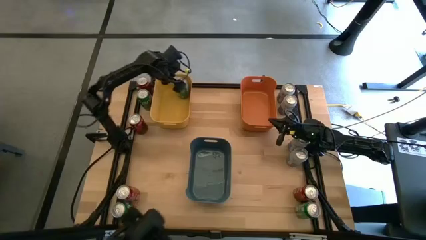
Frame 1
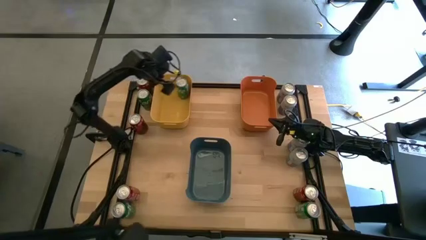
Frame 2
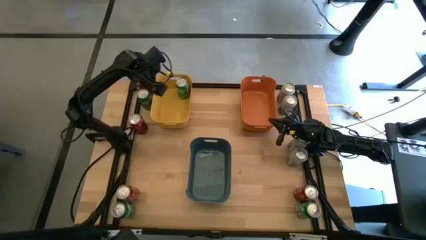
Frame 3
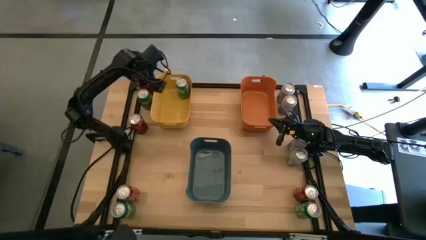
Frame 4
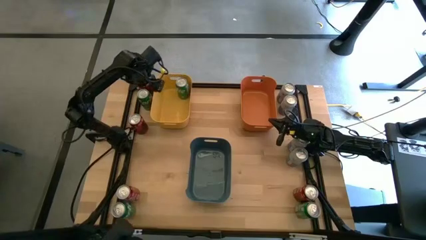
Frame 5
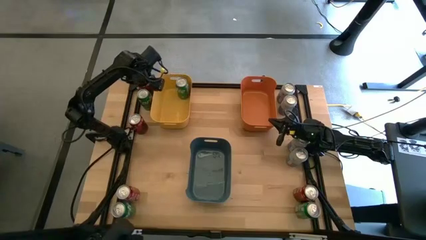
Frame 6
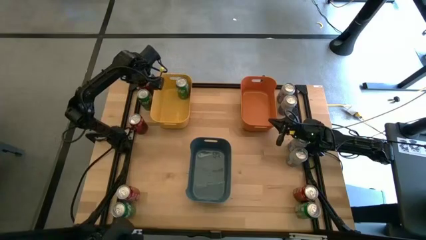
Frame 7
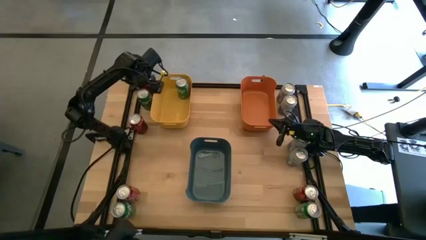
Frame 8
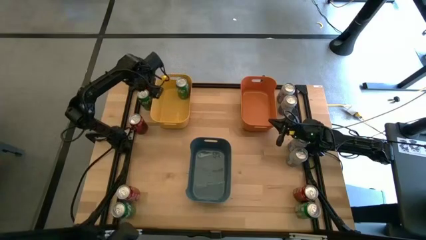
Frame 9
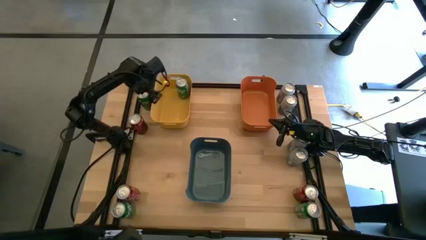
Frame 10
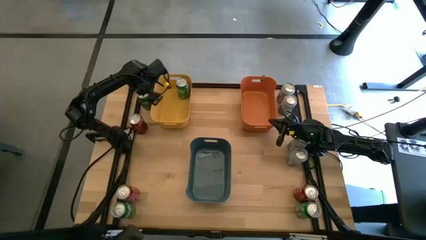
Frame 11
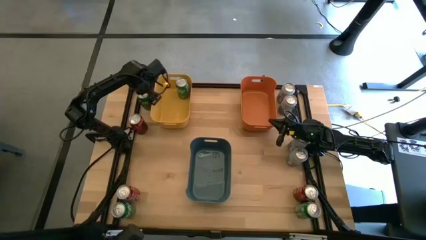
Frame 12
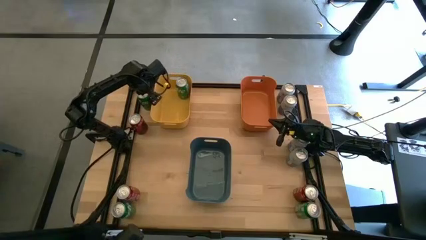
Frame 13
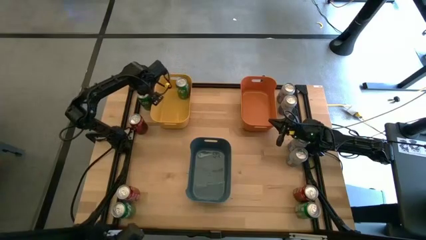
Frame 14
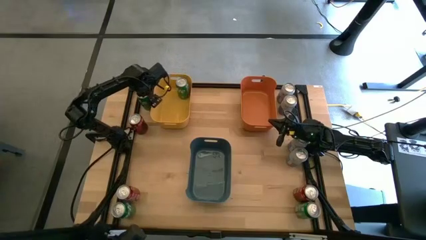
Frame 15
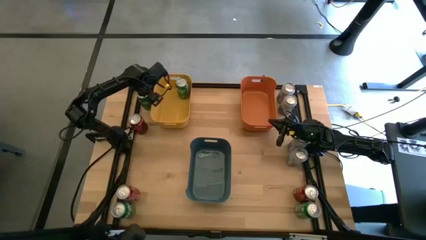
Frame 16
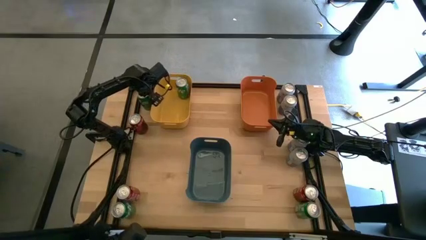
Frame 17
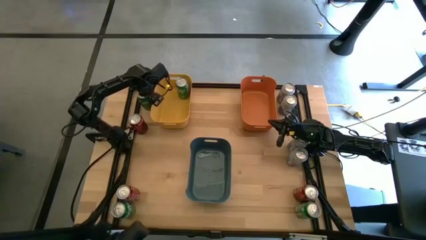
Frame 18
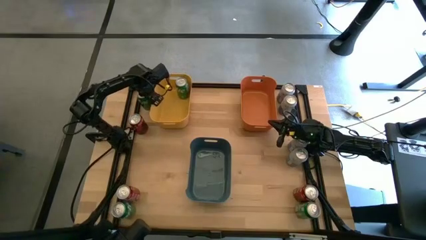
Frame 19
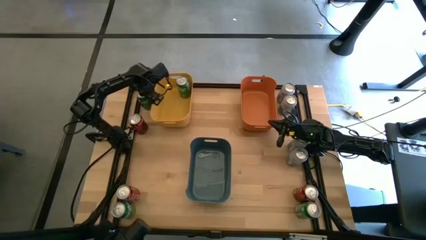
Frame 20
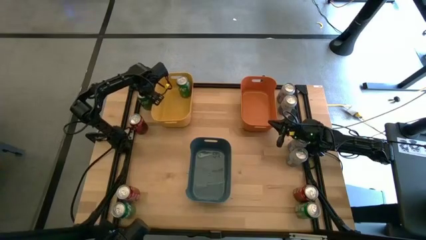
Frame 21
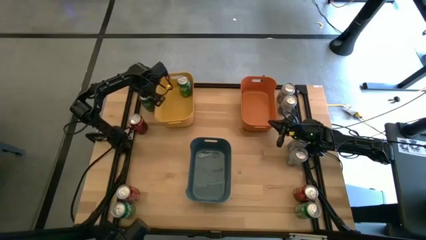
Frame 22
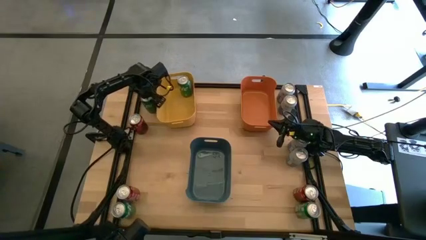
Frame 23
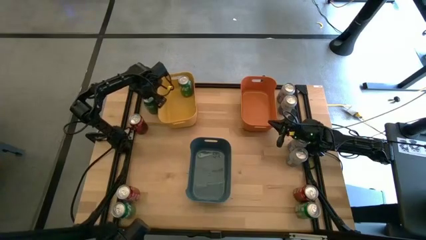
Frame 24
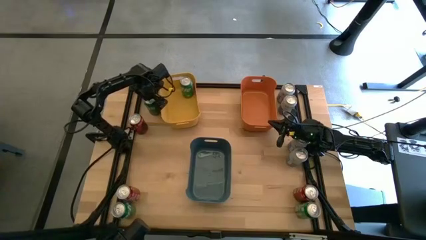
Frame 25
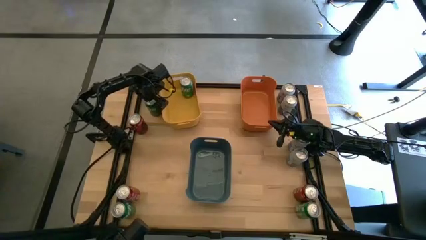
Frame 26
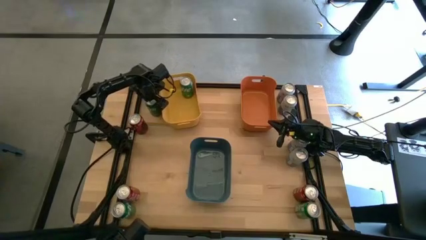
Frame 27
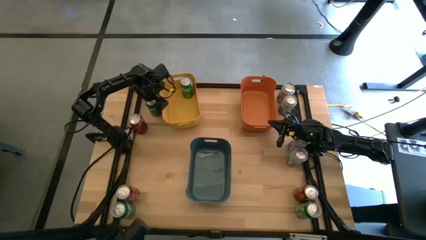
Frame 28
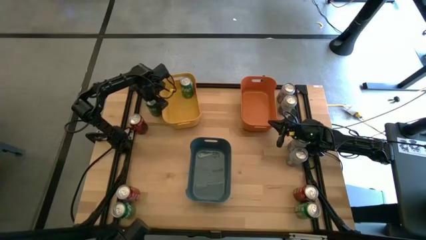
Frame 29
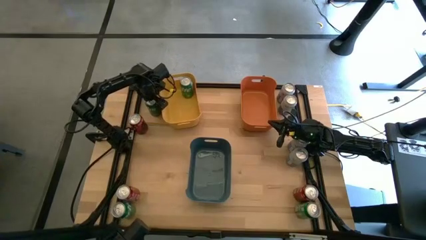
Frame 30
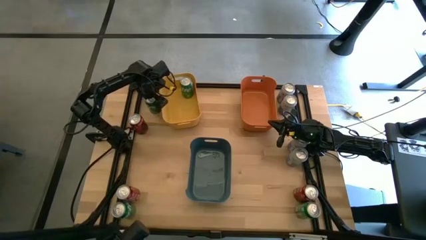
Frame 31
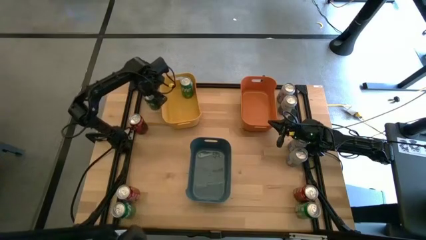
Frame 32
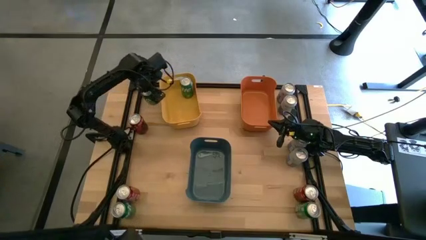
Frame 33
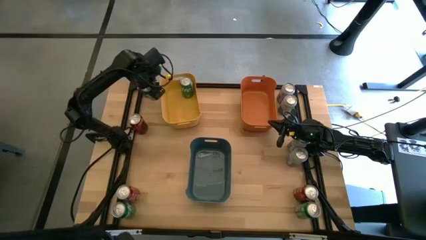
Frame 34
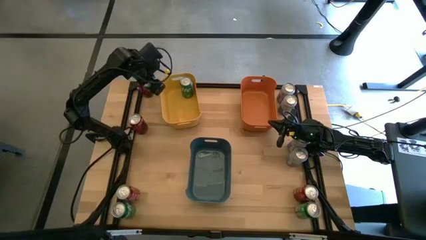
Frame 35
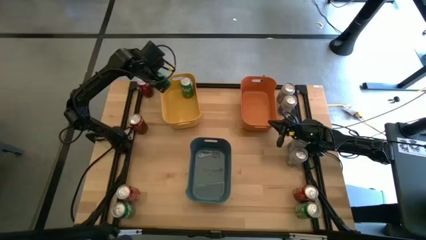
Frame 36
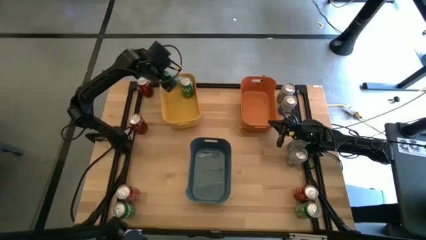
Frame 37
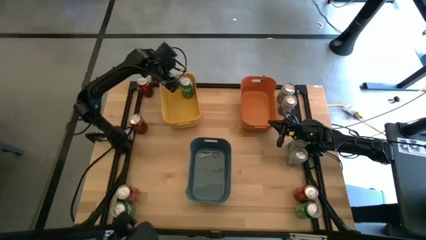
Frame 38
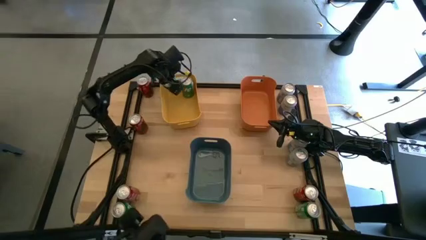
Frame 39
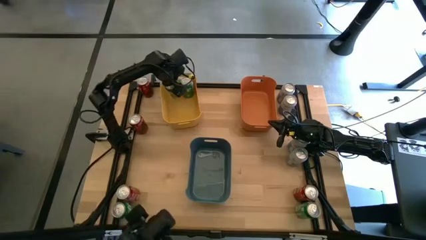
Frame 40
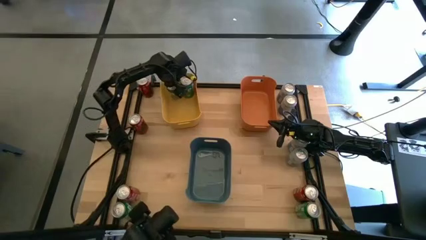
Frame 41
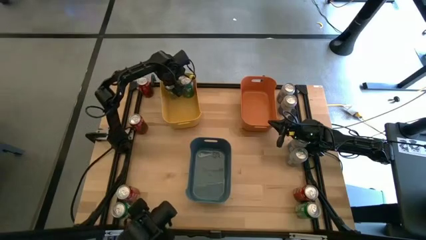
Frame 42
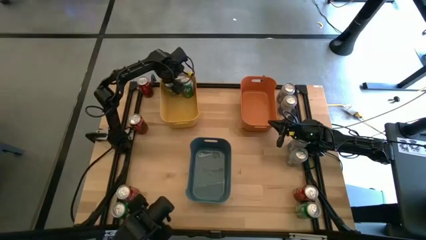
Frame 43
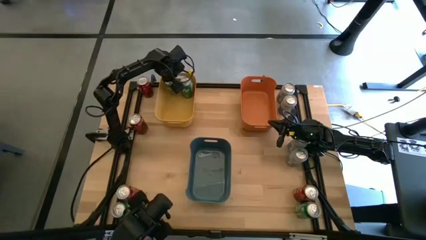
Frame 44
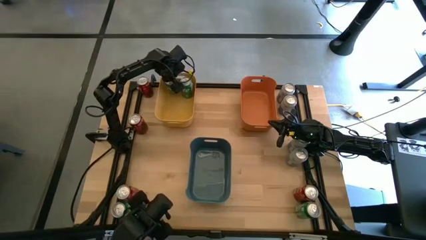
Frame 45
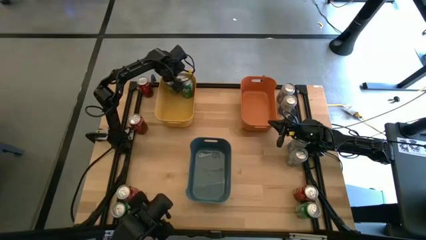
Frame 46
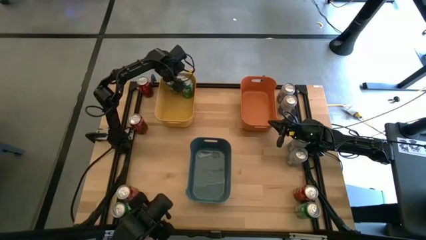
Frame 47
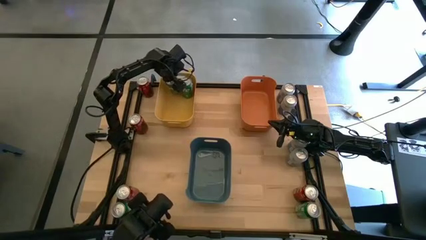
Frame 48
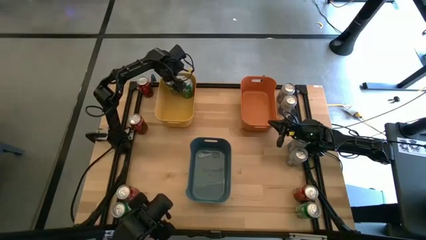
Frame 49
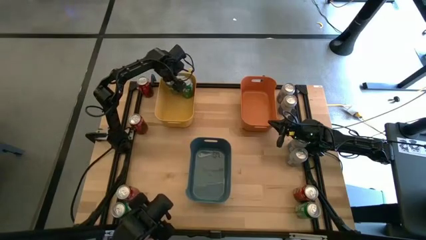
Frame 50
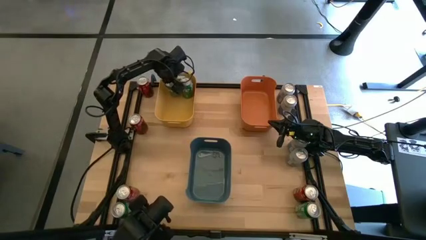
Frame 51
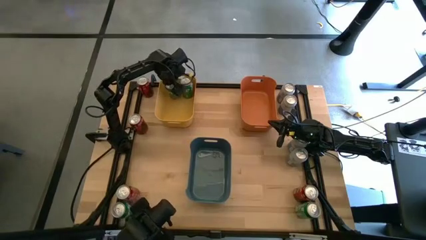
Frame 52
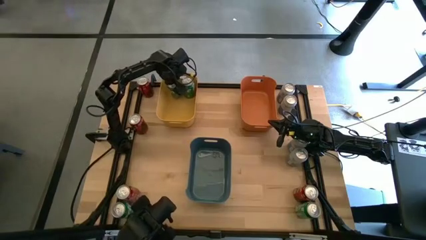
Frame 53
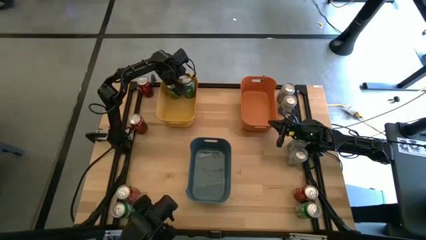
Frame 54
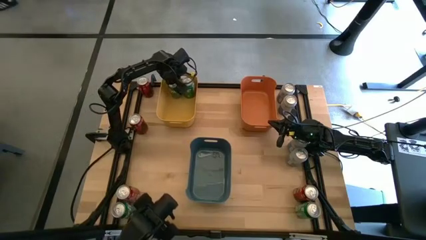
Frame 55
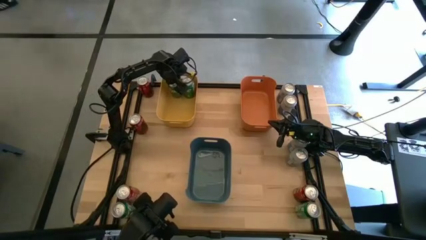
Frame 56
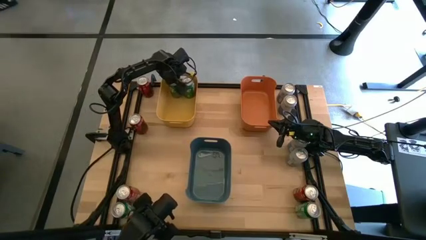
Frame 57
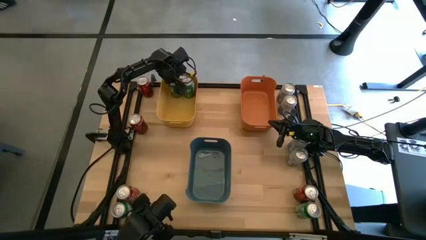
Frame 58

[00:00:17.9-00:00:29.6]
Task: Sort soda cans
Put the green soda can into the yellow bin
